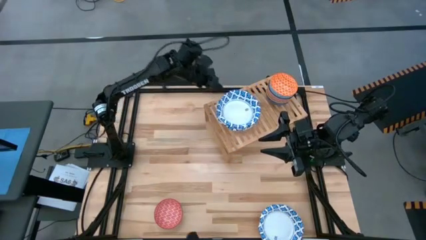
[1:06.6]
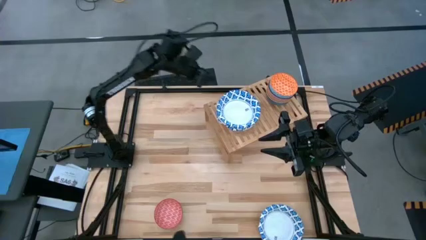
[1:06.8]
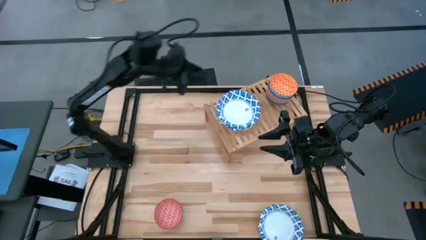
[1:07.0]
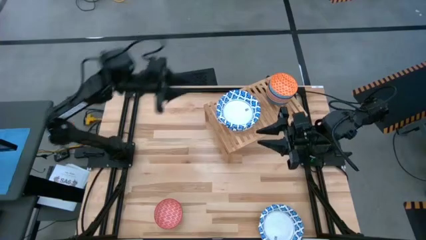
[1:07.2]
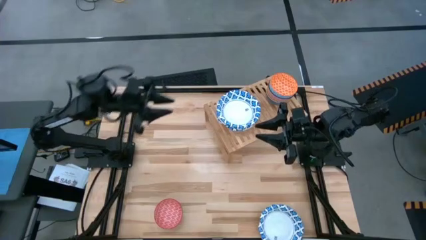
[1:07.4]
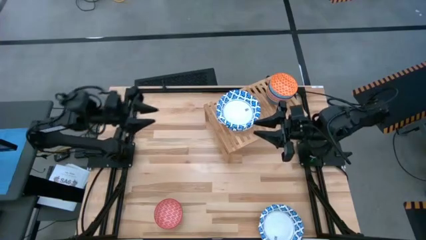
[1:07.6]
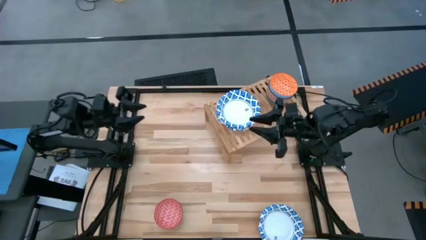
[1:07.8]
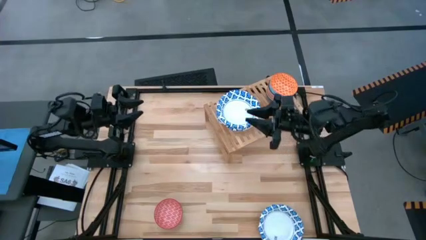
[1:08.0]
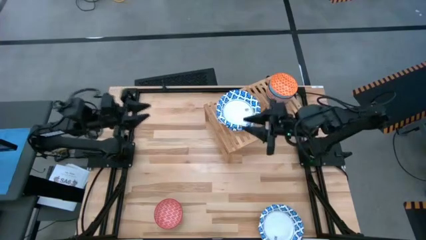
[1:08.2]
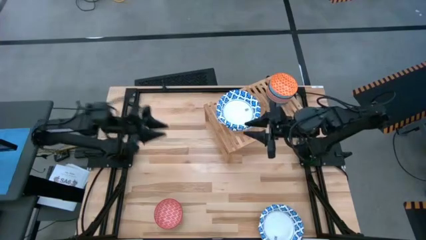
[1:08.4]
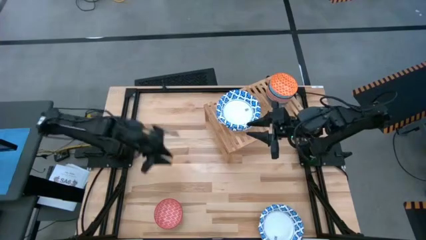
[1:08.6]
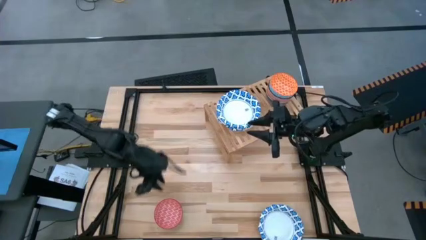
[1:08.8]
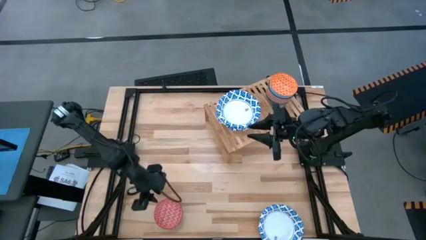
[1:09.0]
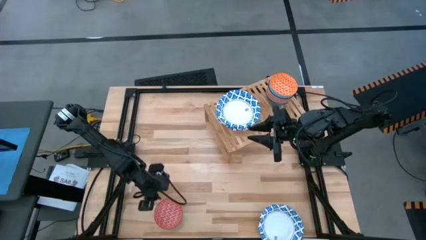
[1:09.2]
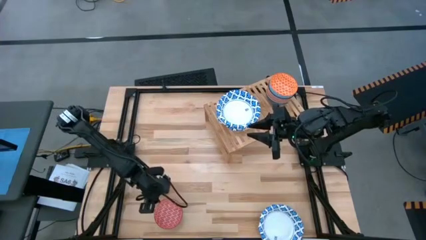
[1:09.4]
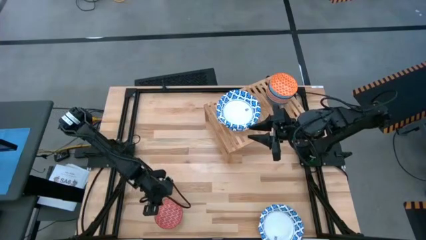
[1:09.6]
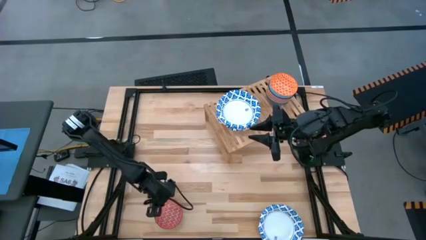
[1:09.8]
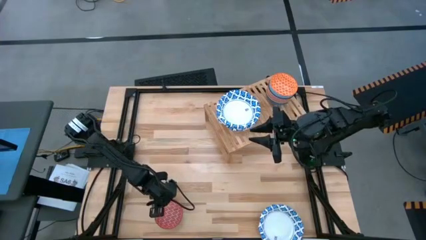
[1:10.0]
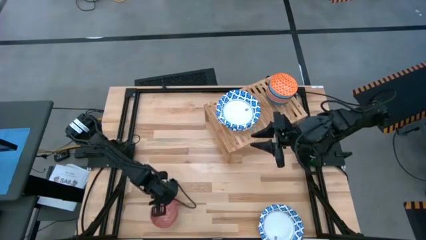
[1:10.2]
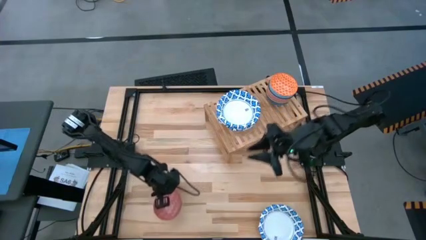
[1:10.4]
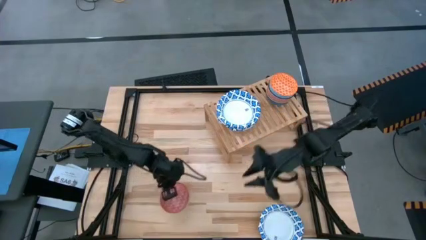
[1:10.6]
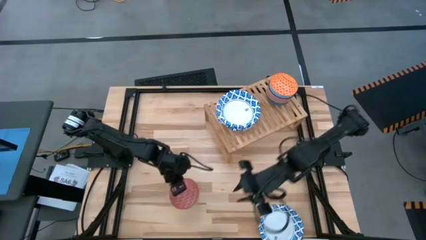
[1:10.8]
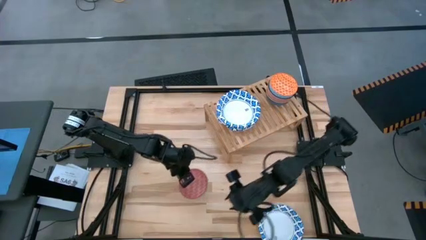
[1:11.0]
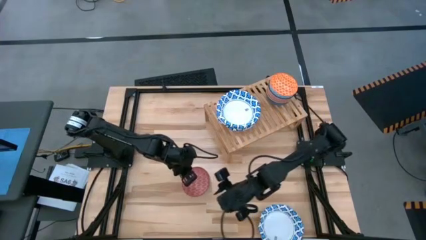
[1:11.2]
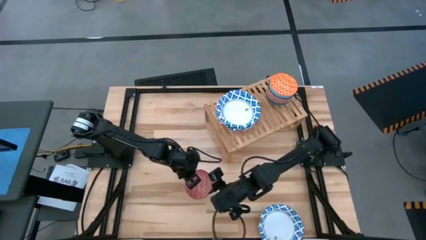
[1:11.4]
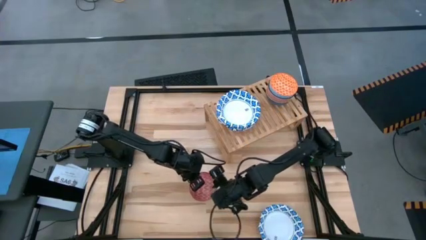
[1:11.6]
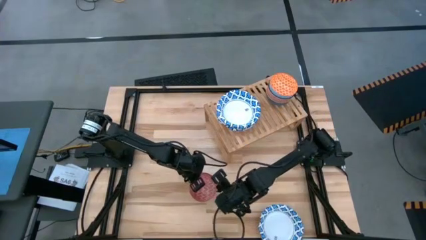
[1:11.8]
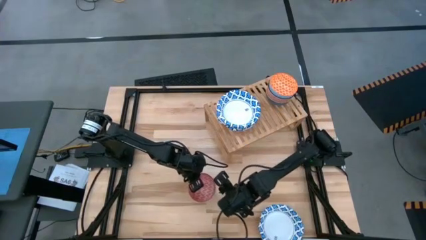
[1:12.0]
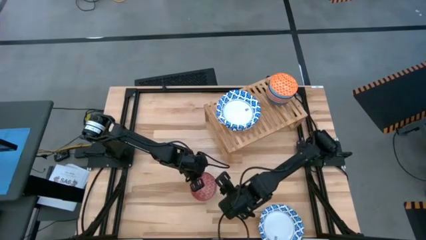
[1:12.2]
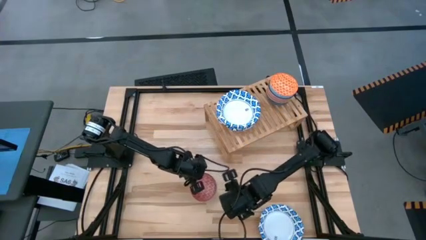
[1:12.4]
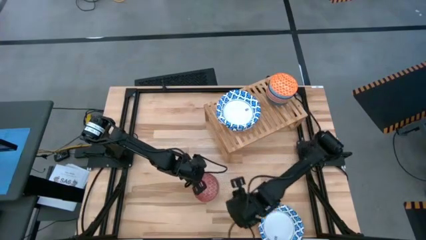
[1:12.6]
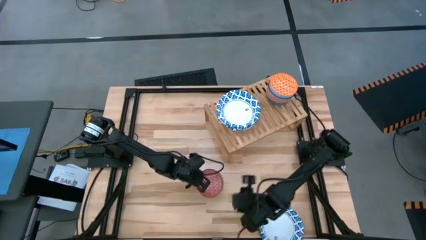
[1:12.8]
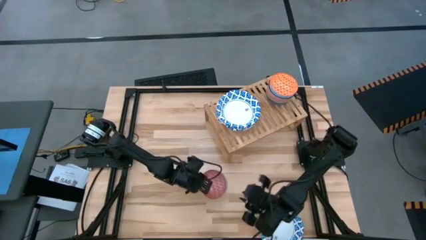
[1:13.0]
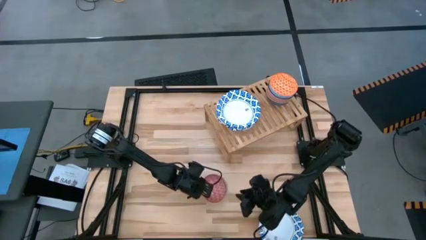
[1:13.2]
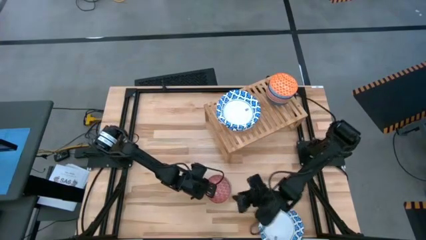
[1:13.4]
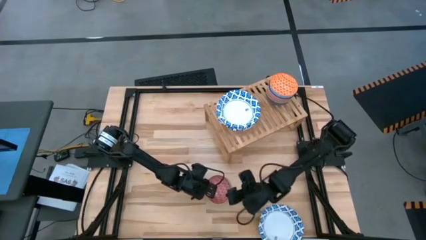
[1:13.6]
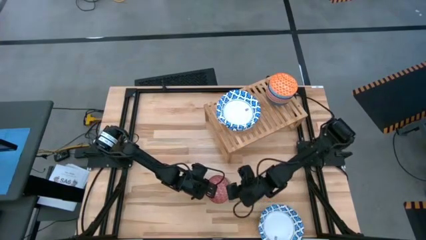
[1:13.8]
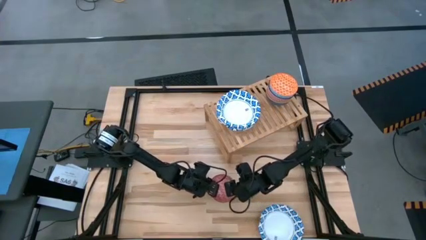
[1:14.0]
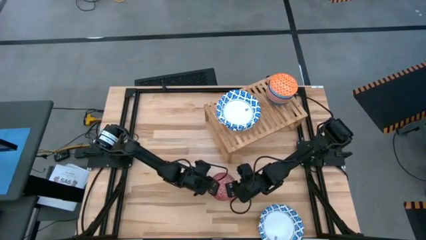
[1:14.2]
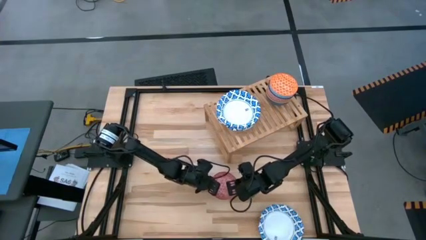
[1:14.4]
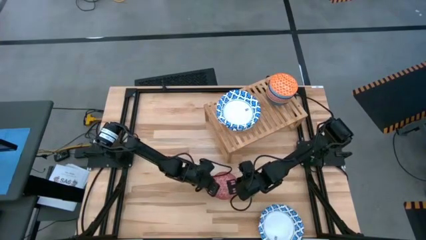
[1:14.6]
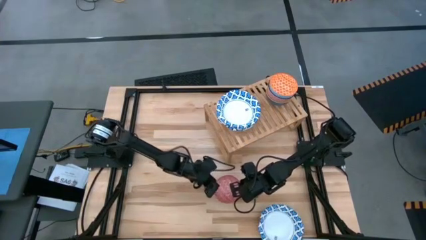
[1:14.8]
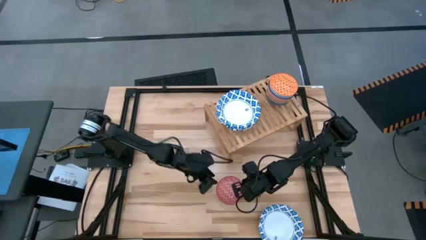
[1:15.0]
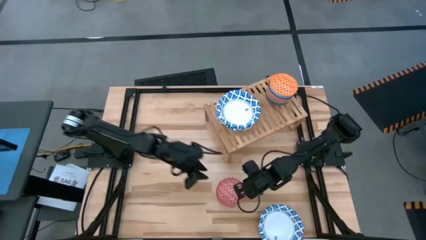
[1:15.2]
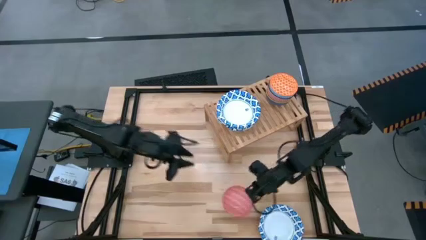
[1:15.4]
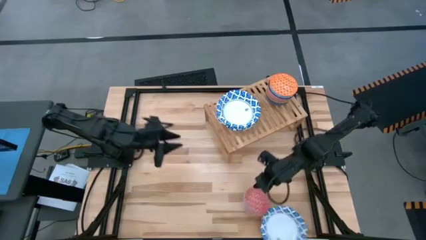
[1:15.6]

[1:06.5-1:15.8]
Task: Place and stack bowls onto a shelf
Stack the red pattern bowl on top of the orange pattern bowl on the shelf

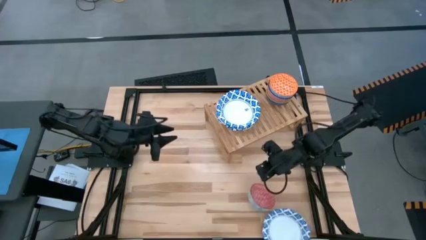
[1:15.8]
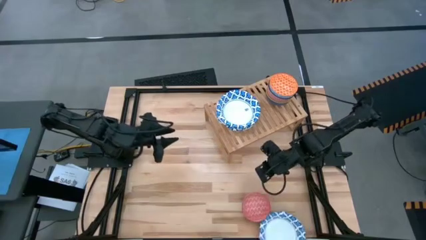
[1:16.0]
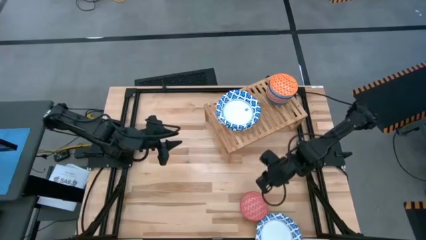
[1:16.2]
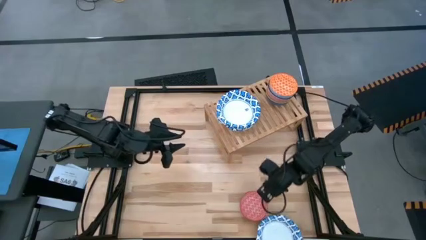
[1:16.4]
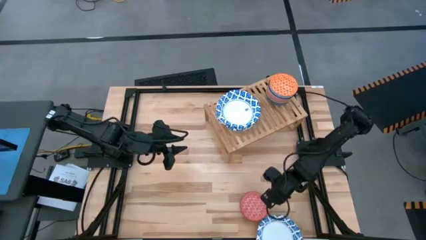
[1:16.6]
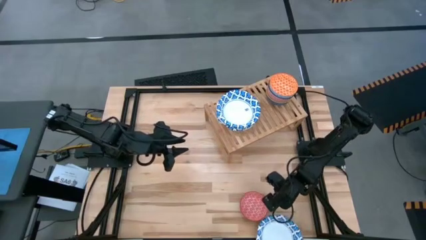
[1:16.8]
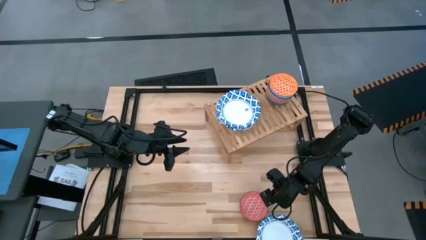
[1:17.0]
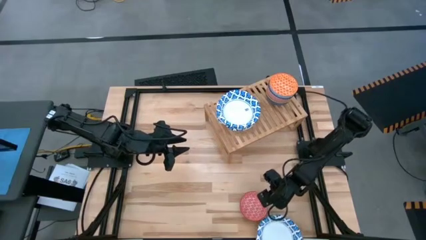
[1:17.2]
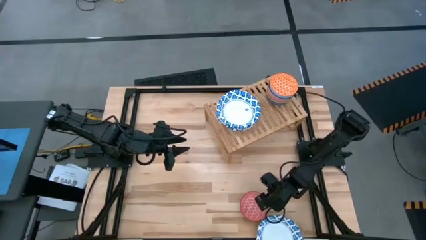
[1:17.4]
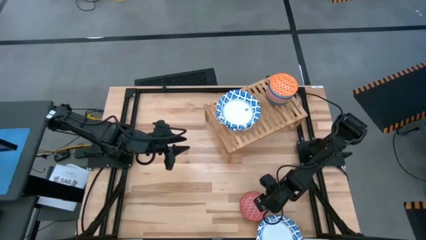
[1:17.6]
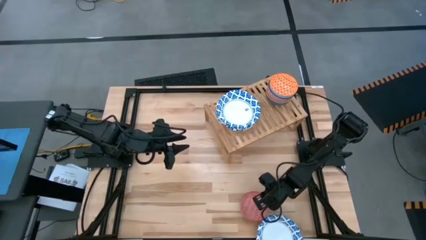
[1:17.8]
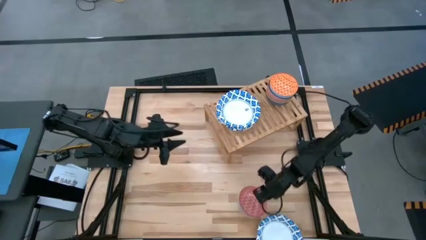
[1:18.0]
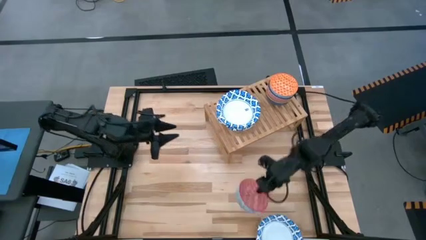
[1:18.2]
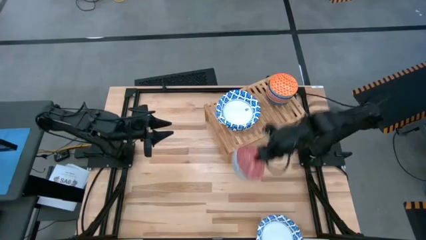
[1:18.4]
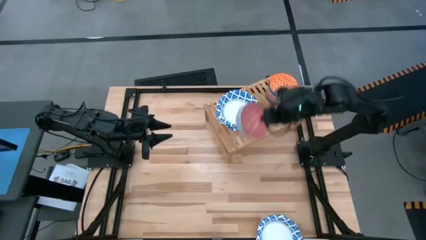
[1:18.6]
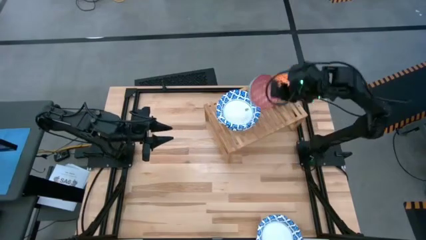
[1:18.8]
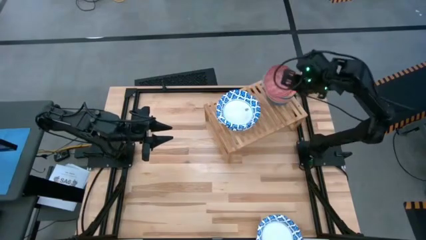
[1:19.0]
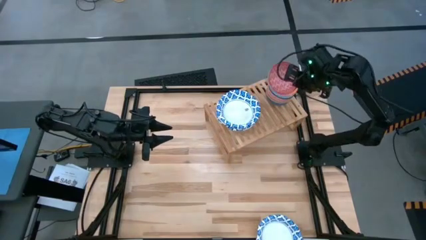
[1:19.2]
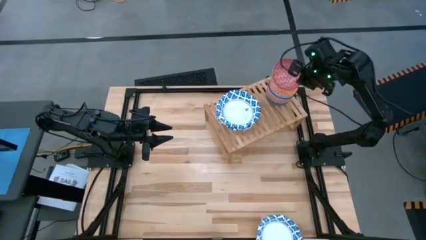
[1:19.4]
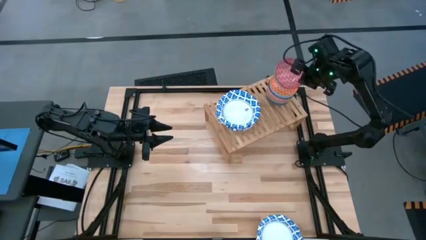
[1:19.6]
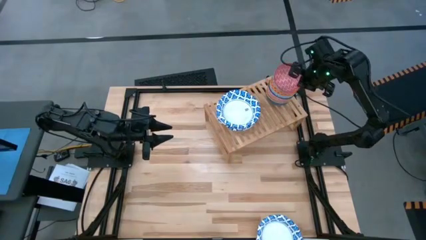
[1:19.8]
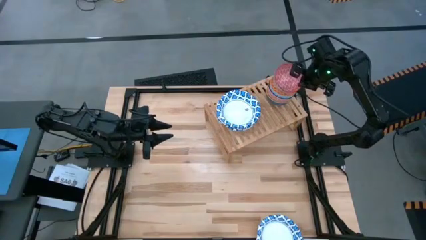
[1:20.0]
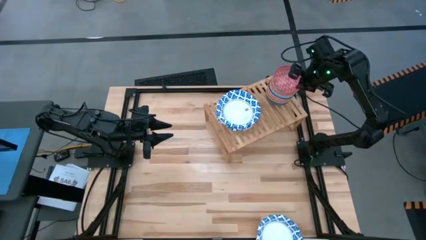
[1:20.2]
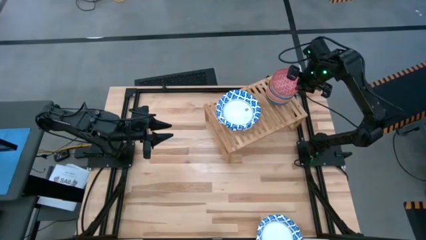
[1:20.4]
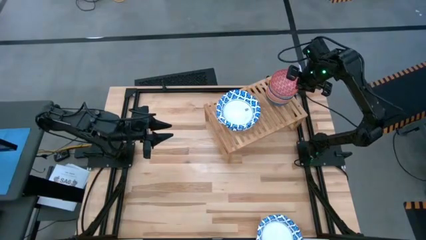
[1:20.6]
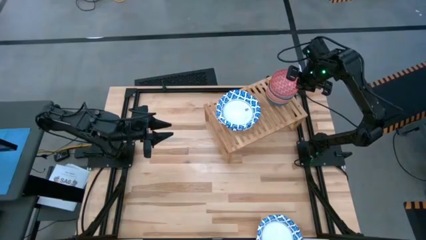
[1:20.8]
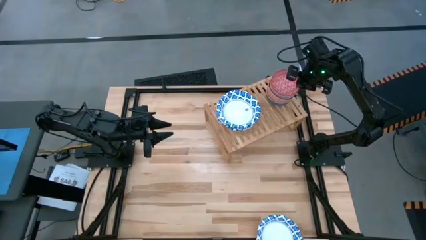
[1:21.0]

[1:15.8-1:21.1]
Stack the red pattern bowl on top of the orange pattern bowl on the shelf
